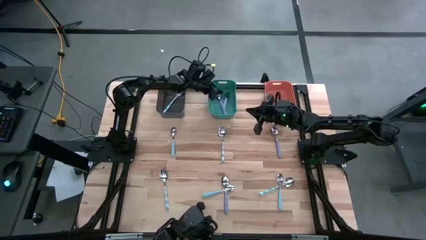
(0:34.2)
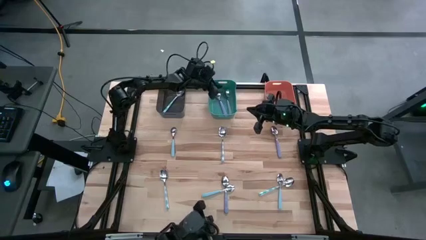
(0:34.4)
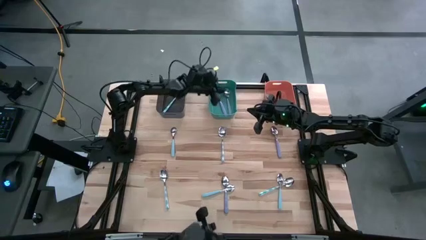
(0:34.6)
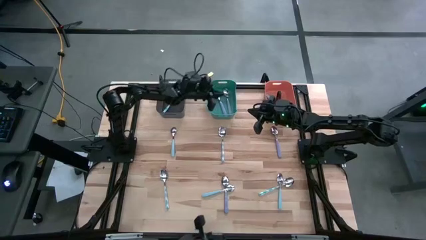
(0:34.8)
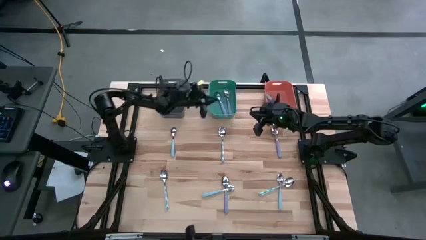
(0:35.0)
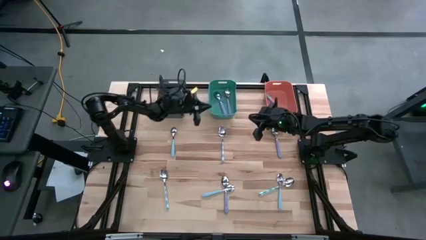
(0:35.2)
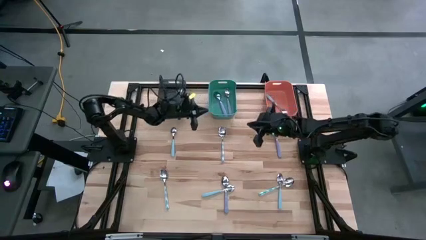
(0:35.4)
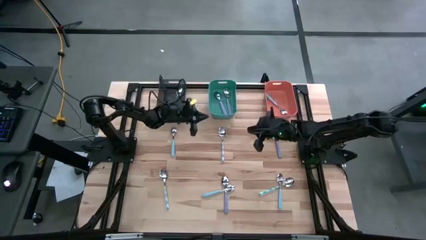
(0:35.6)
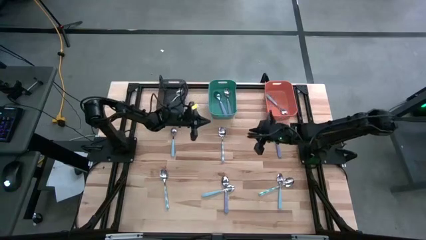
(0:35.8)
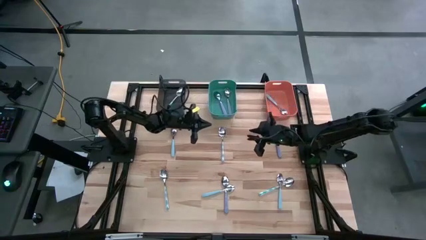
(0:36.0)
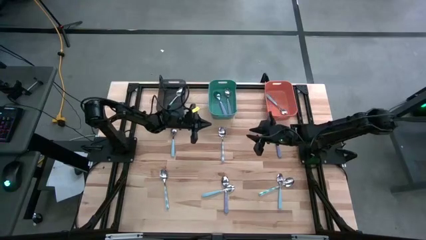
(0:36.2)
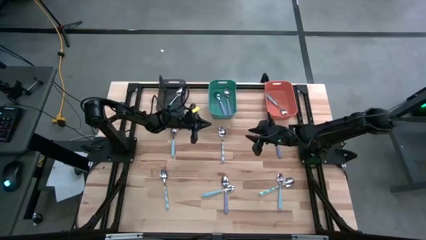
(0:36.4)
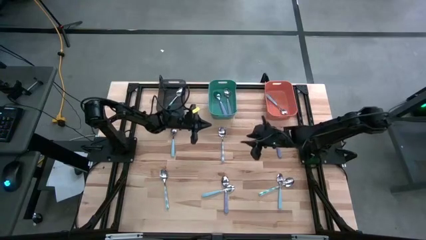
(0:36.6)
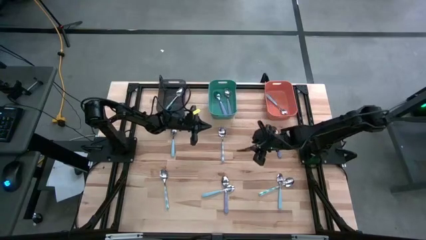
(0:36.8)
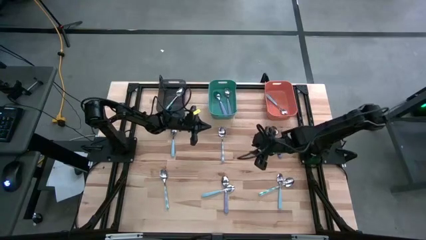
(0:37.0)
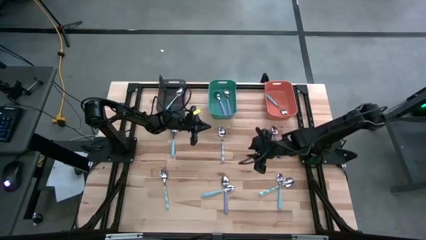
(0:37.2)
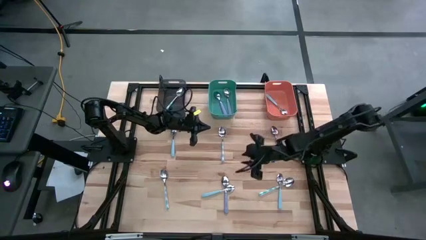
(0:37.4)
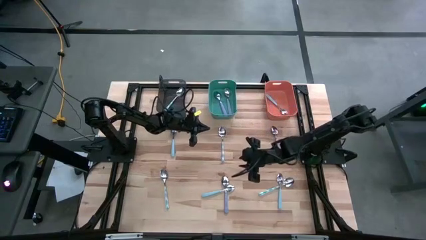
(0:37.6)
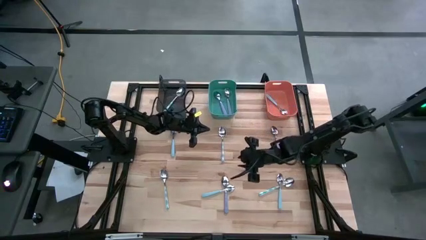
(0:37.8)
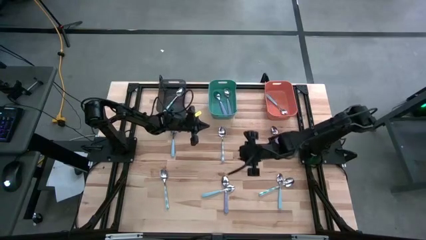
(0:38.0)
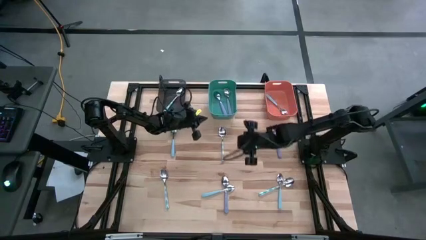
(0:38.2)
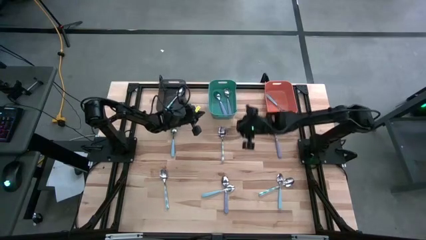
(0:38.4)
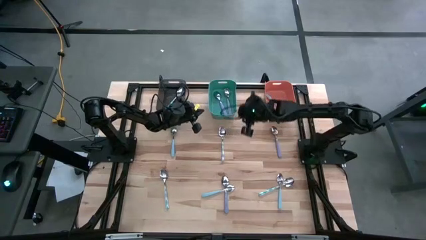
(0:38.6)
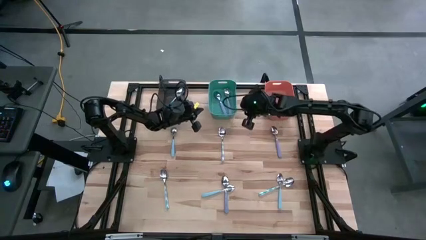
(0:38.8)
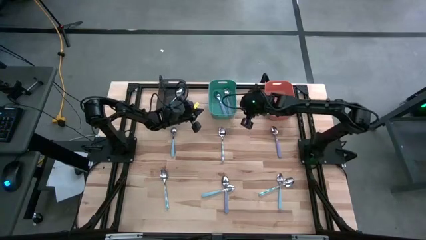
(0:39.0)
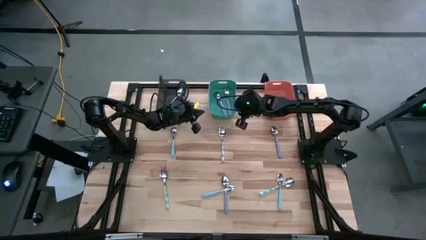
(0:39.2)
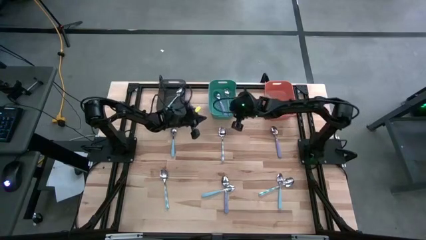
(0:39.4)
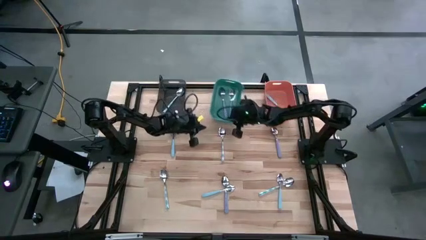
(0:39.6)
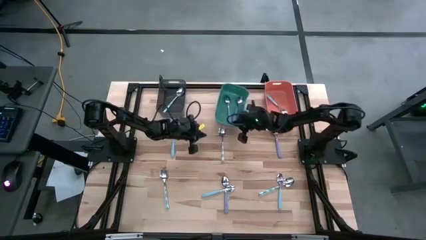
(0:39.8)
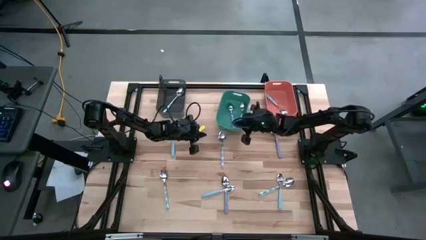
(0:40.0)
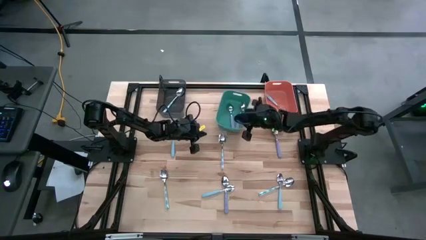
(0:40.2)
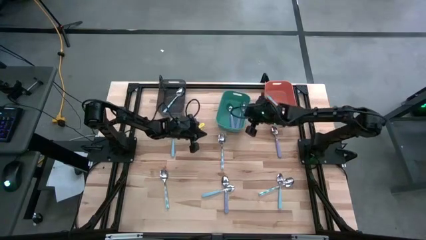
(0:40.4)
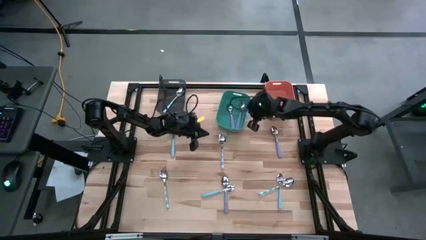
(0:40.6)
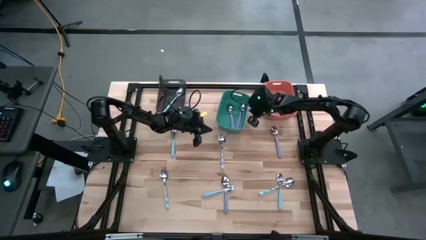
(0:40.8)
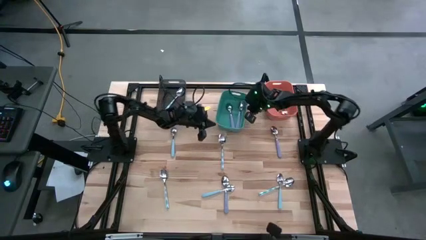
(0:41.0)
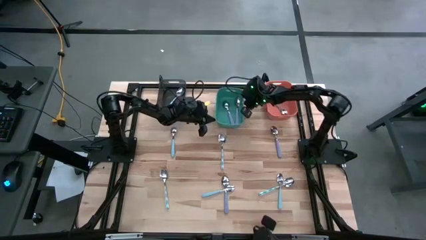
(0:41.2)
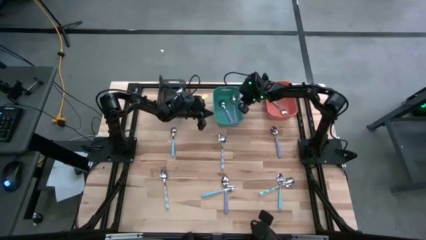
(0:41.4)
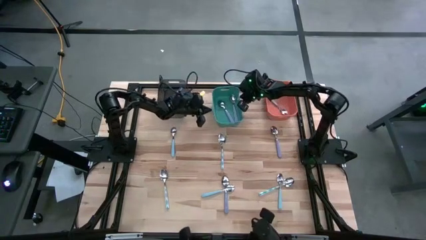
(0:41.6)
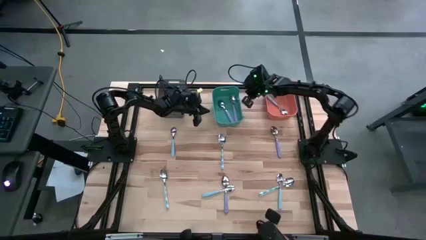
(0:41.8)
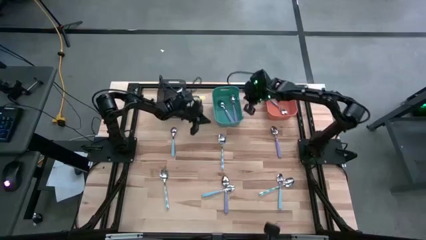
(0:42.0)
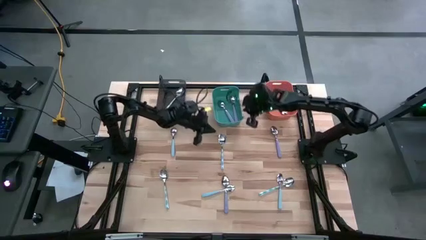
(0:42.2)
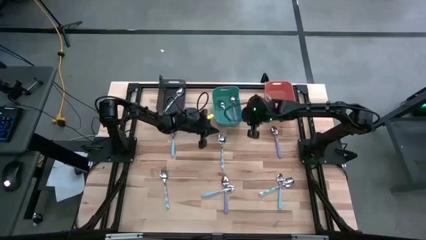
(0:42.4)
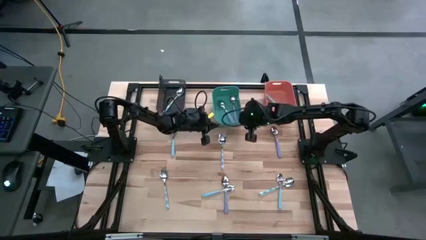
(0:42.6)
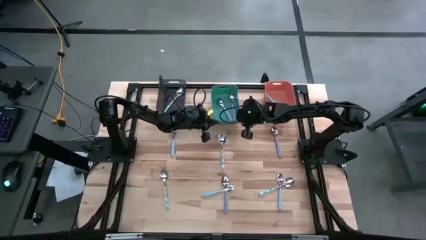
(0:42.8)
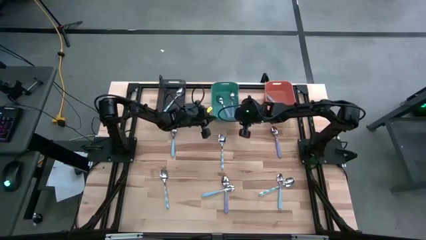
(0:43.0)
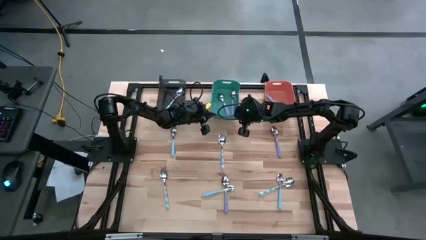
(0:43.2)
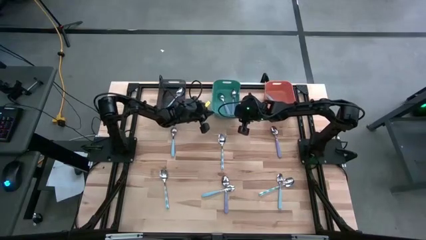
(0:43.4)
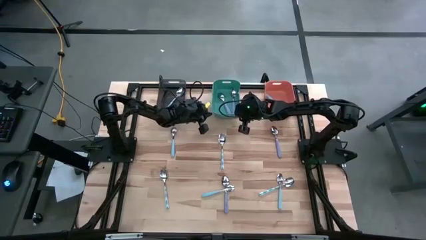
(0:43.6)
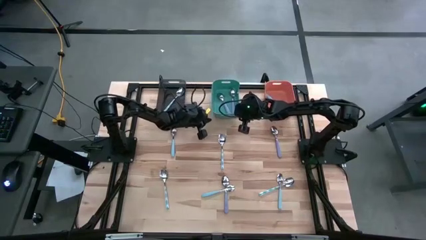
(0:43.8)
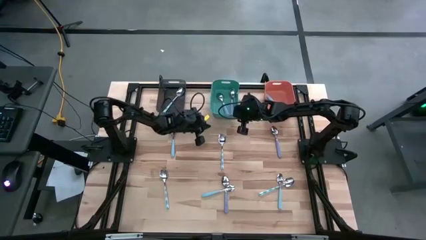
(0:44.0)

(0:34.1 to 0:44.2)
Task: Sort silverware by color (type)
Adjust the green bin

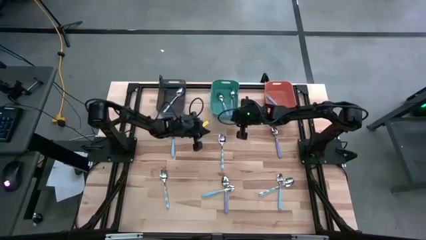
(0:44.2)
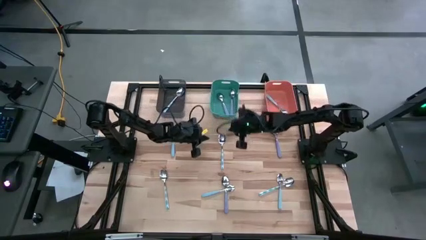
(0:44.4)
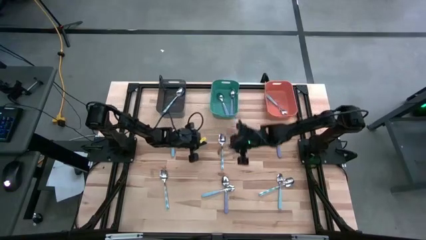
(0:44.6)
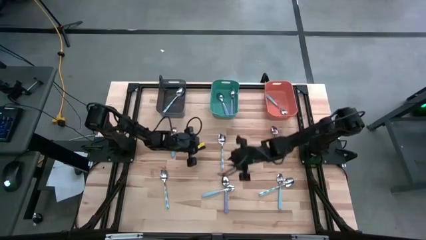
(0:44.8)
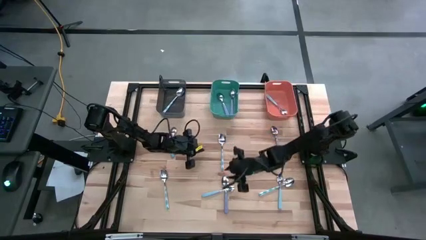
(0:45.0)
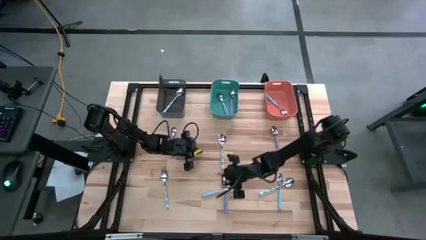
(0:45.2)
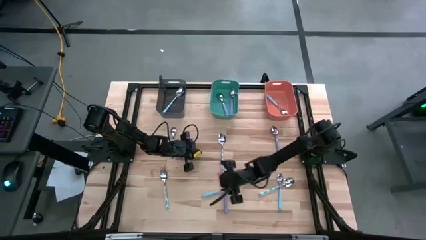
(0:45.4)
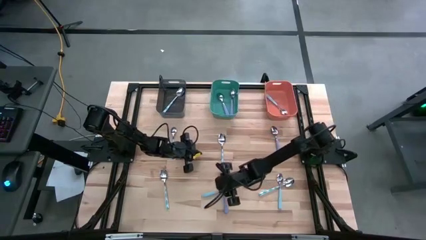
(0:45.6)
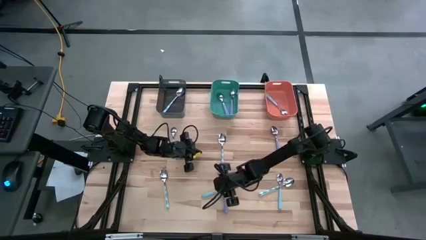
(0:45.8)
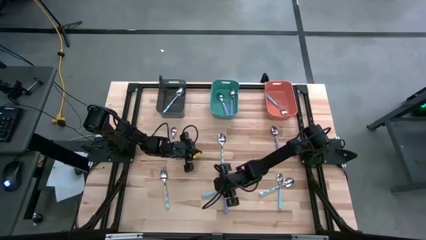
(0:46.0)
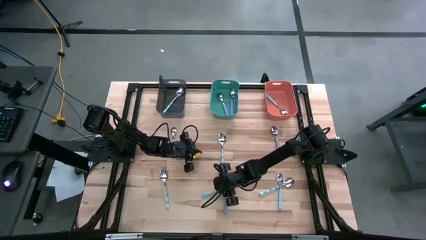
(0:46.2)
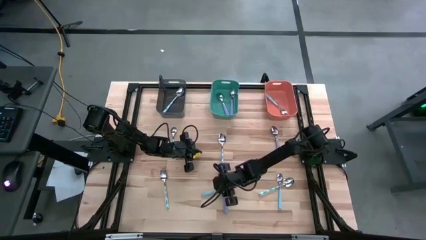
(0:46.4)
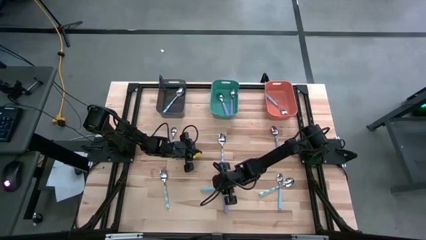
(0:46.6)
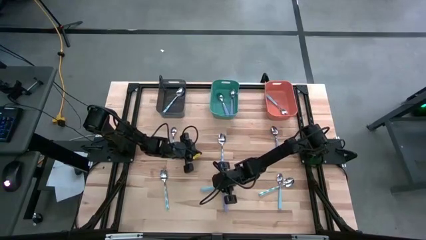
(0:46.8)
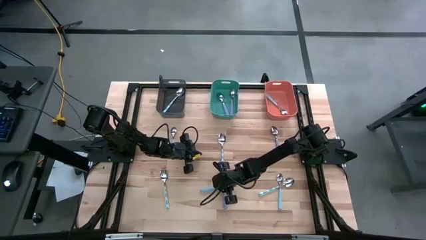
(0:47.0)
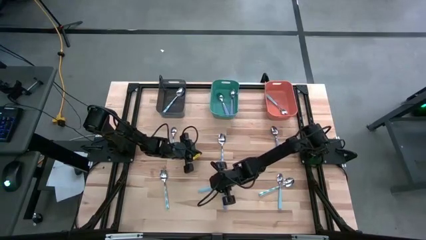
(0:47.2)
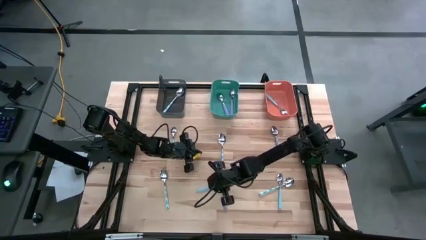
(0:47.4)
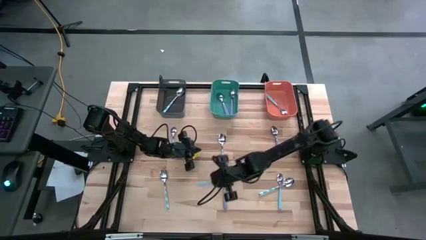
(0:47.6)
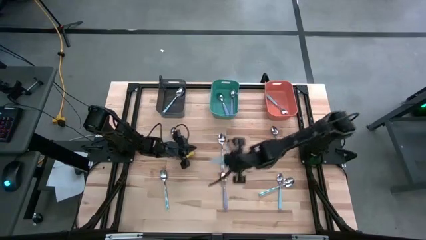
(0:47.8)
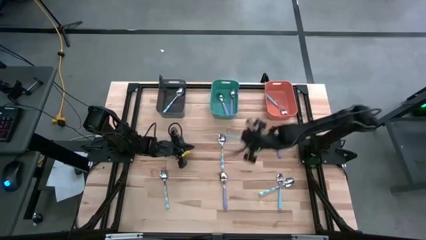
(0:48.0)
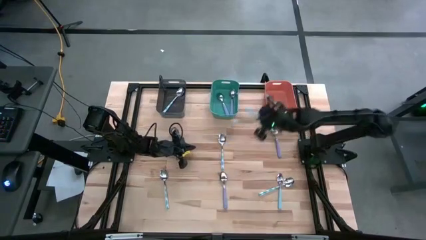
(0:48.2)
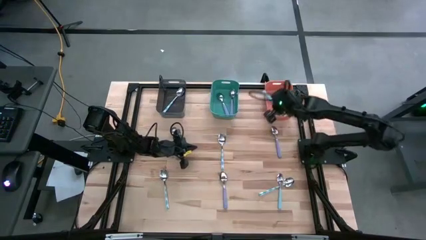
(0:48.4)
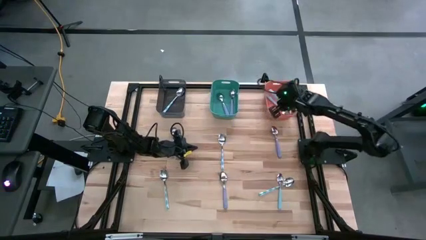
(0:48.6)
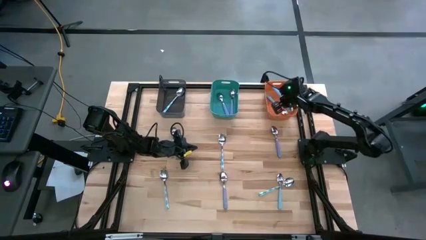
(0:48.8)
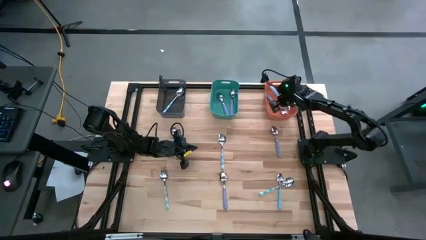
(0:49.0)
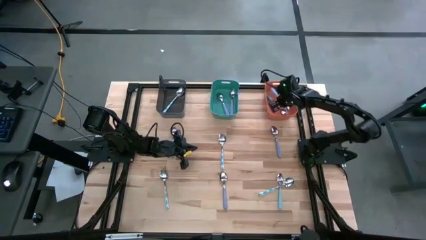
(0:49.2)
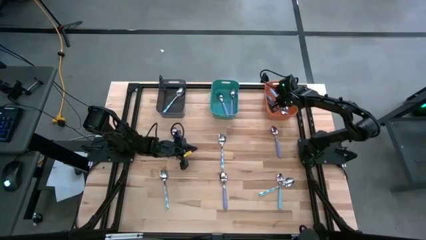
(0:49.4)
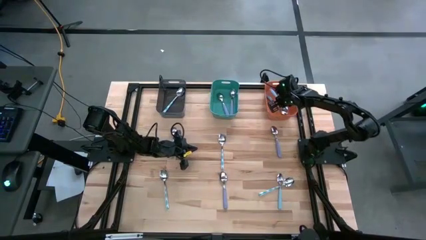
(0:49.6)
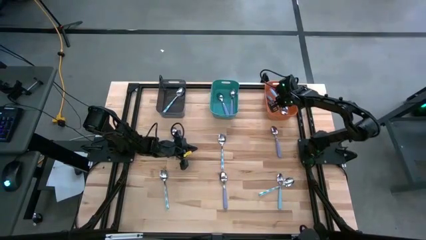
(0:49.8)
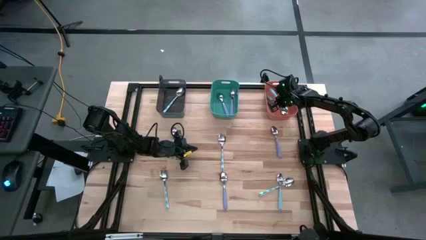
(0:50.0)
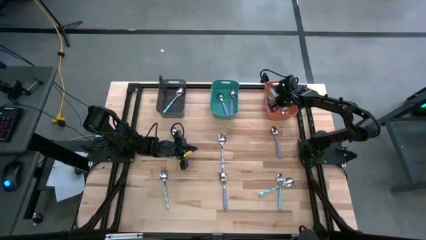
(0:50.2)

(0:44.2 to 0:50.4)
Put the bottom left blue spoon into the orange bin

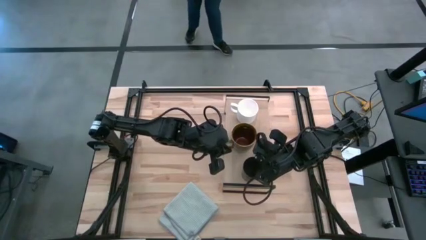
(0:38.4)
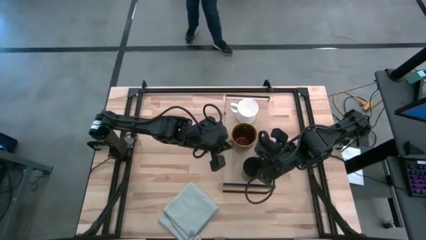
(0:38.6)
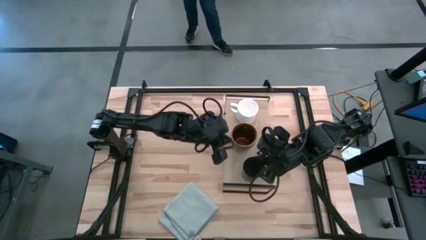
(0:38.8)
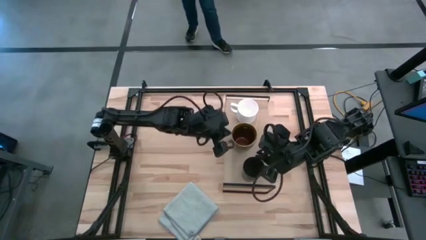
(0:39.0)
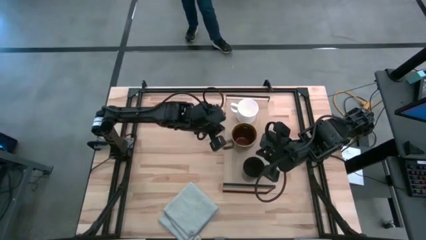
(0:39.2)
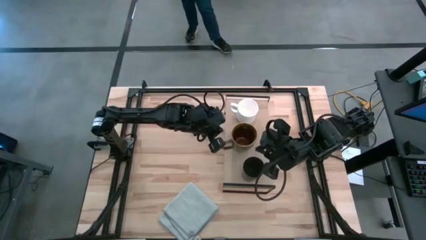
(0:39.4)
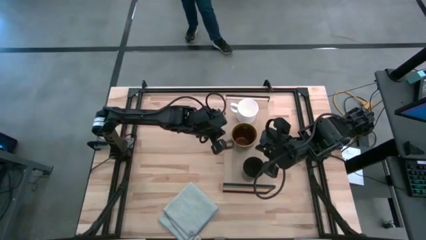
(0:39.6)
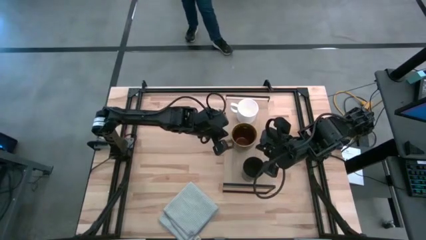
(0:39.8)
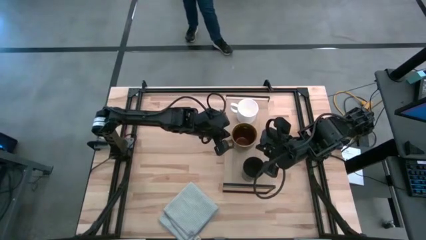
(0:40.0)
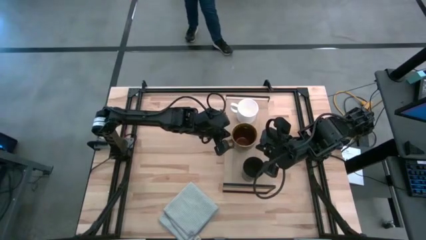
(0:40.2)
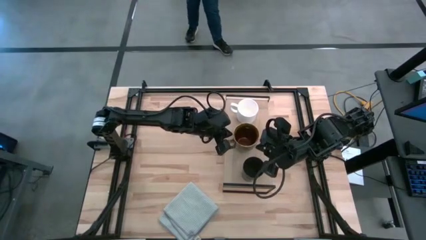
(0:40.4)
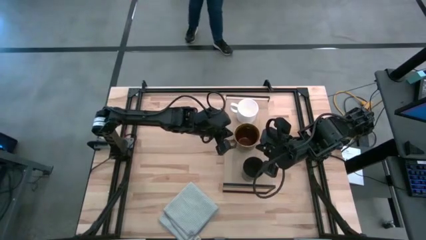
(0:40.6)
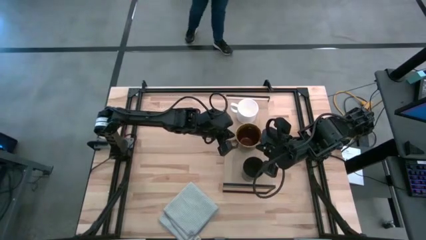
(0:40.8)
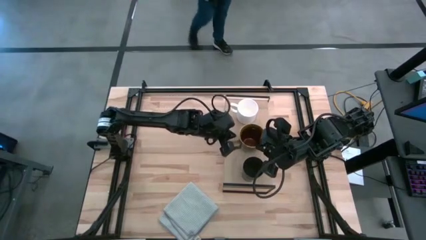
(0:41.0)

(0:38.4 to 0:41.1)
Task: Stack small to large cups/mugs on shelf
Adjust the brown mug on the shelf
